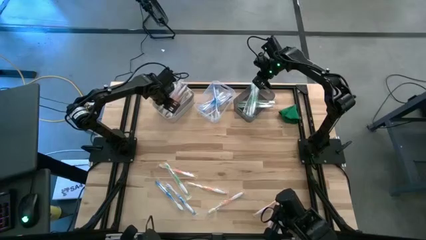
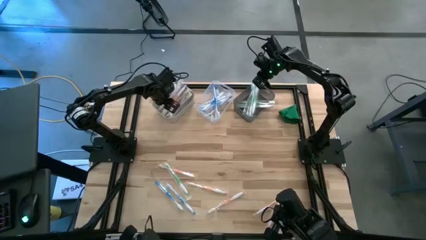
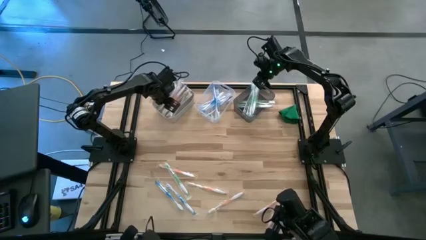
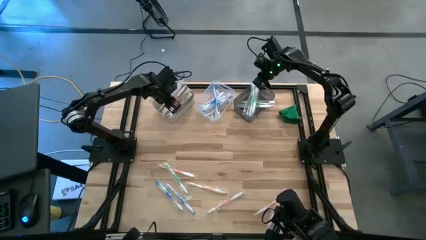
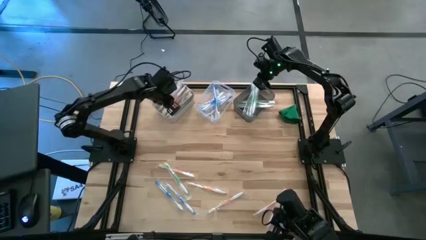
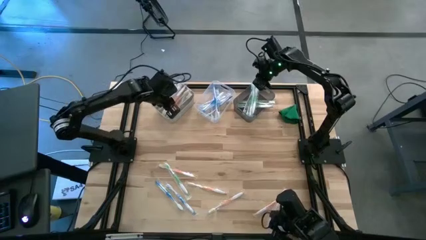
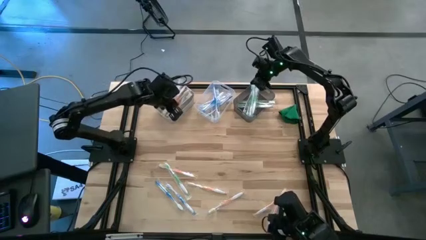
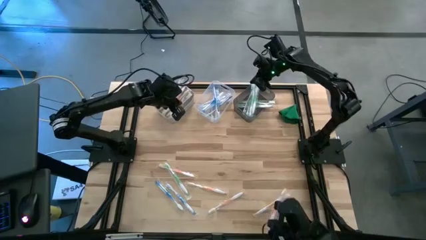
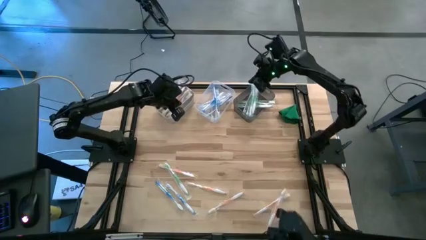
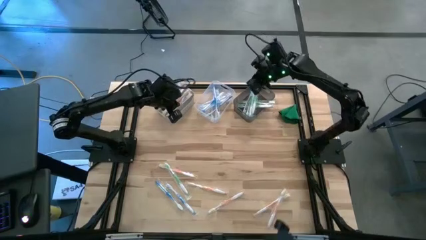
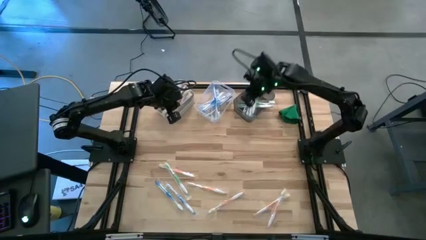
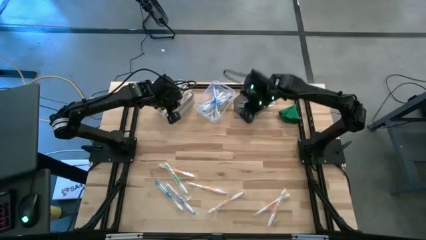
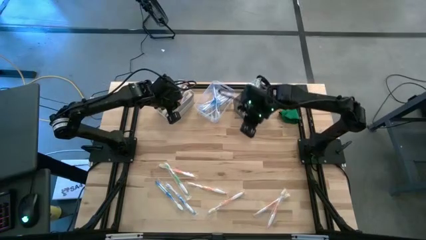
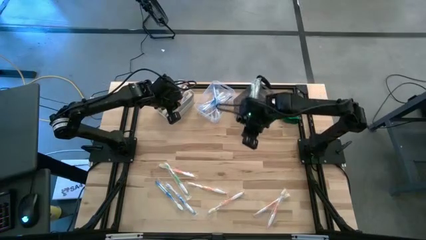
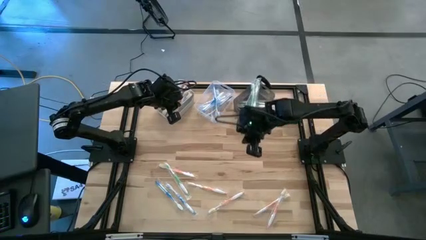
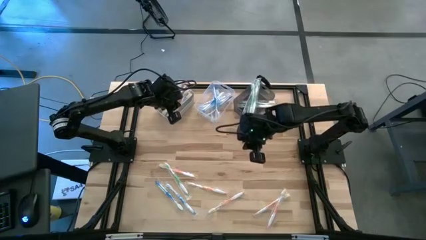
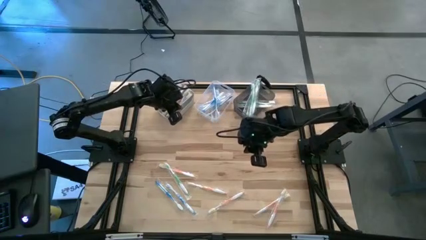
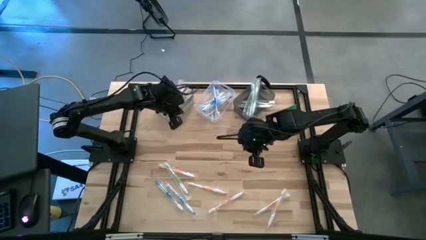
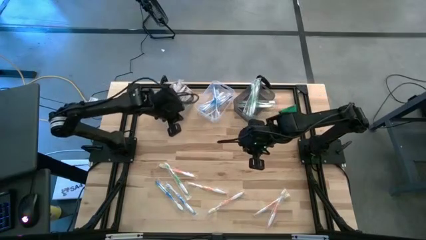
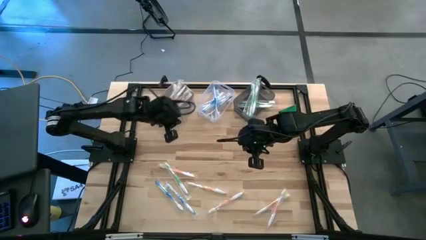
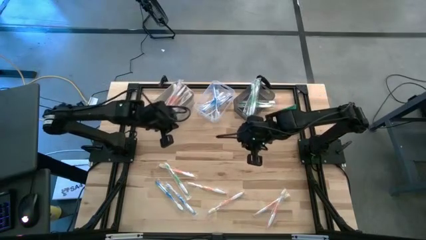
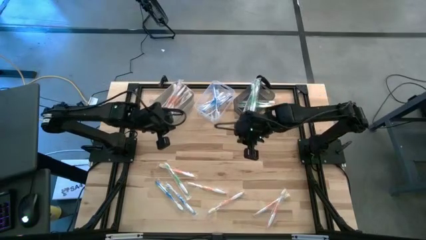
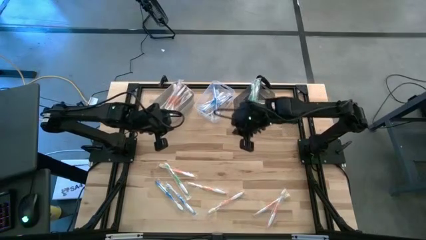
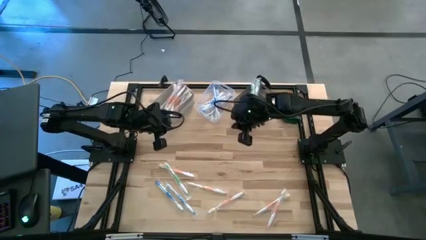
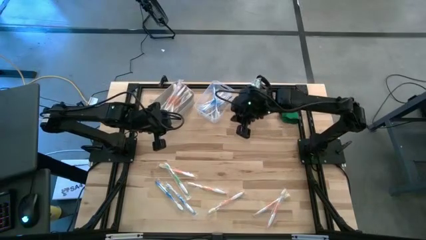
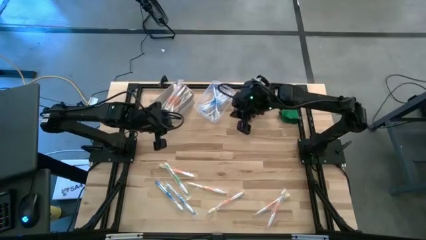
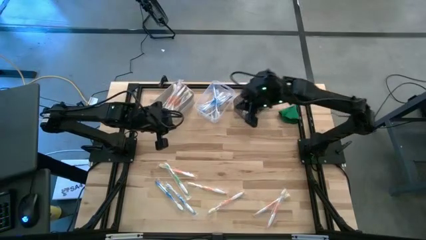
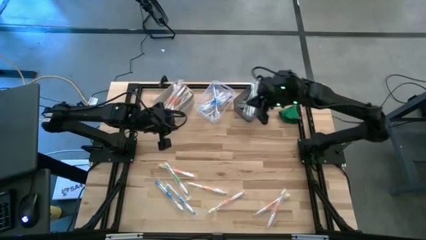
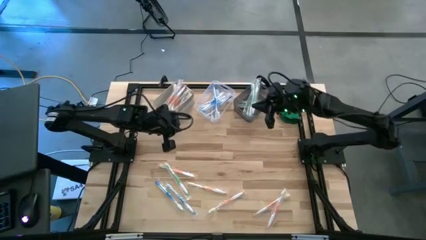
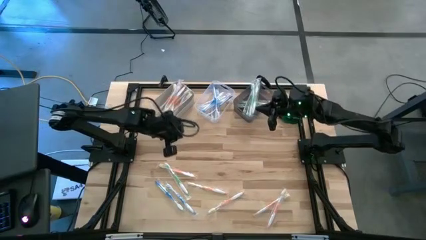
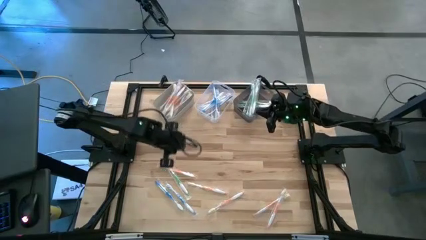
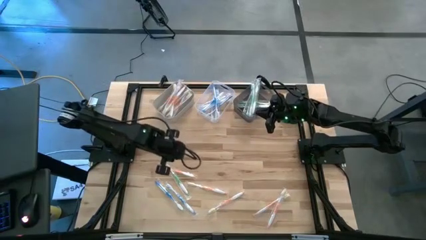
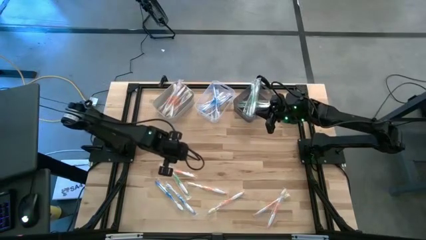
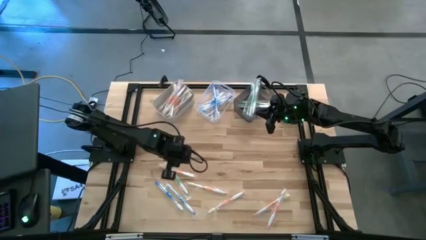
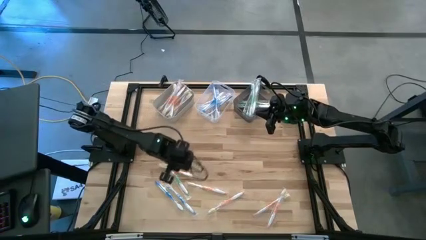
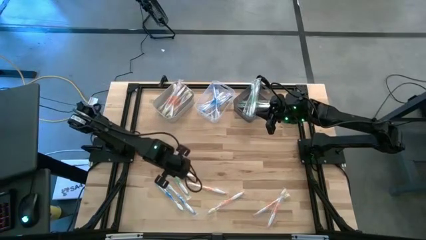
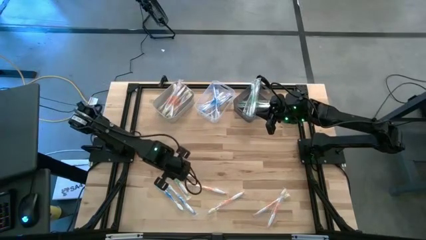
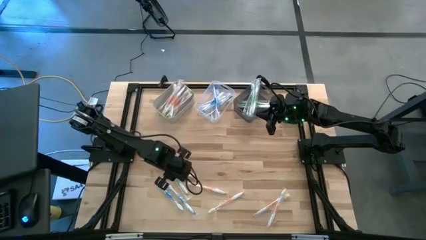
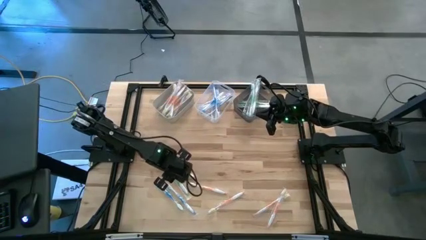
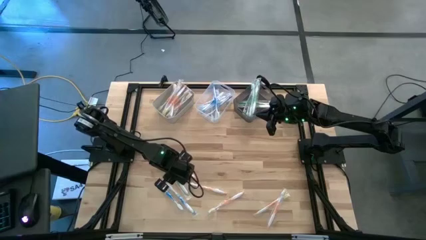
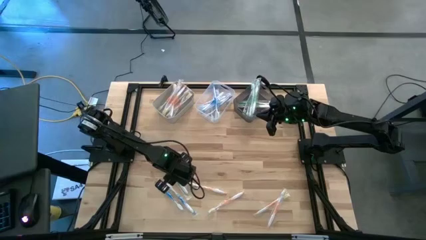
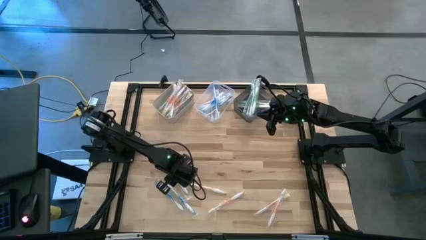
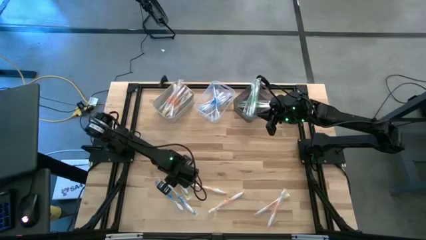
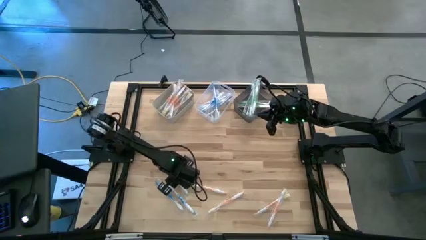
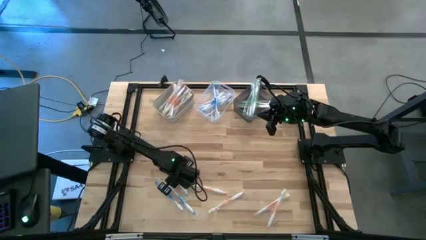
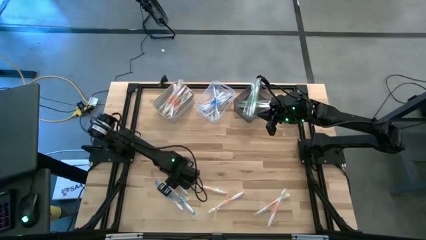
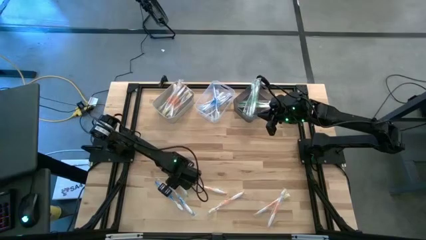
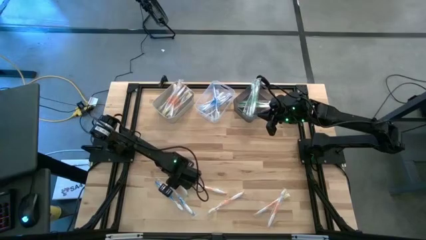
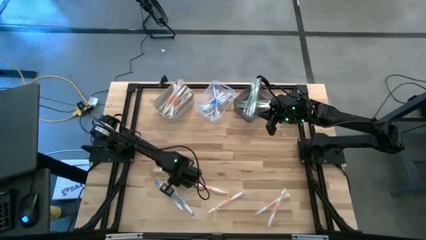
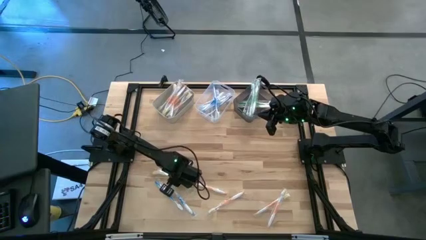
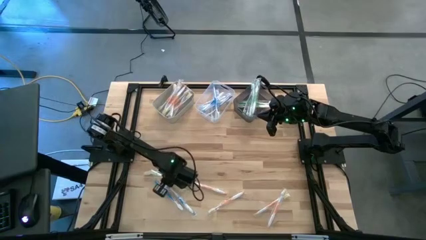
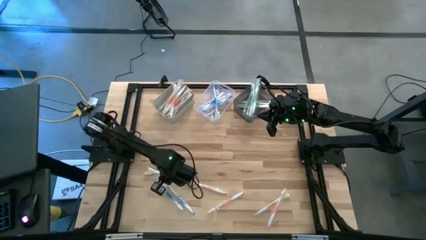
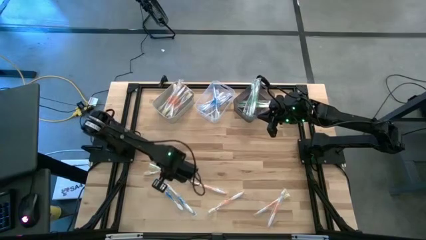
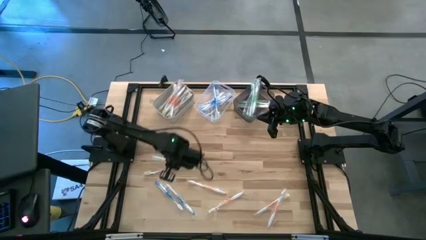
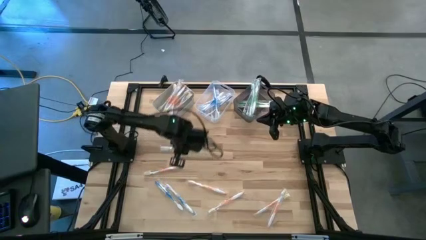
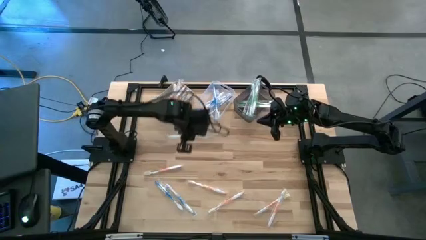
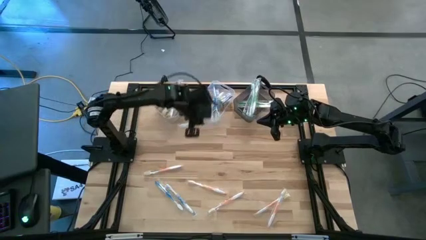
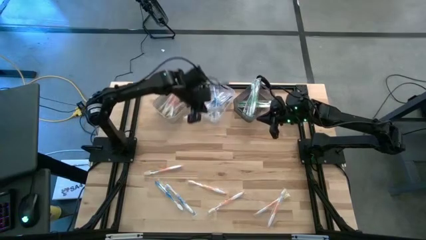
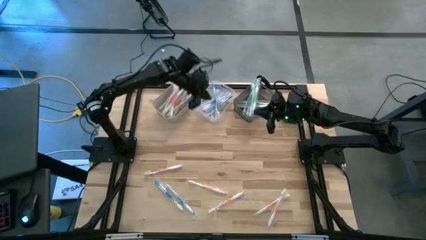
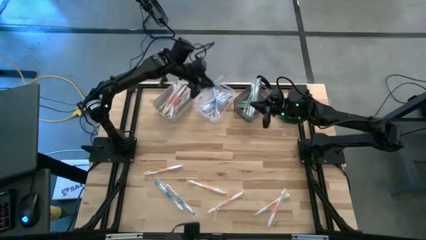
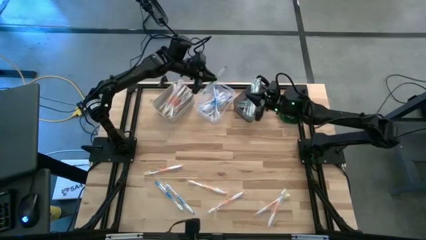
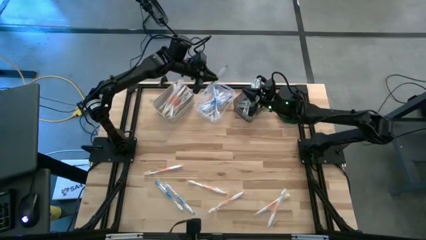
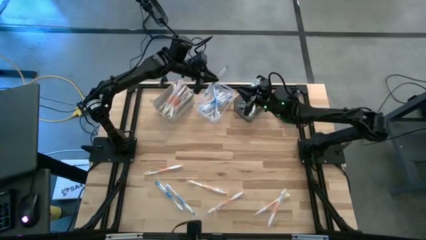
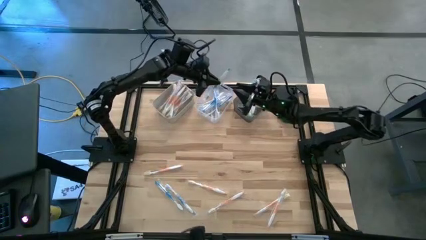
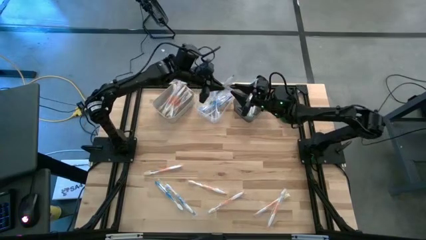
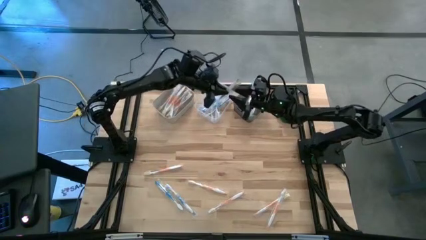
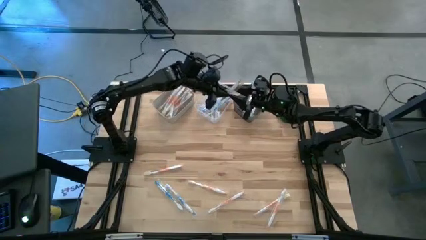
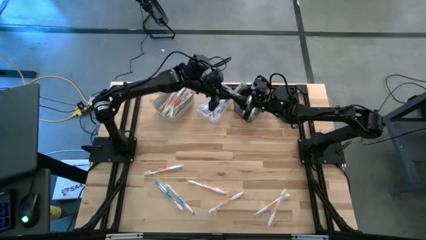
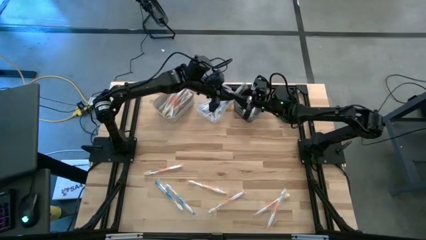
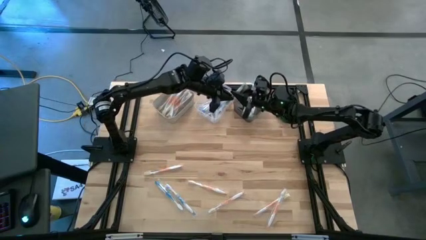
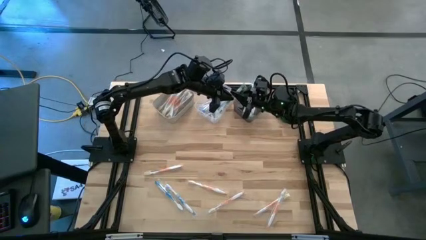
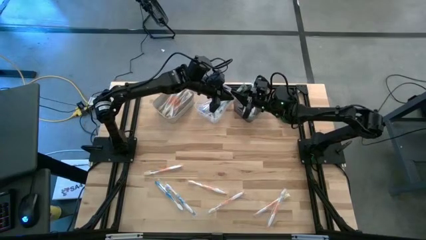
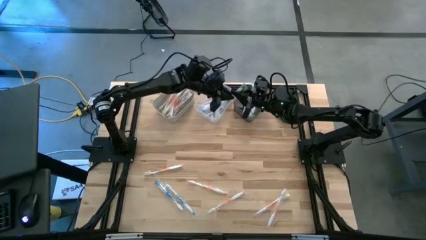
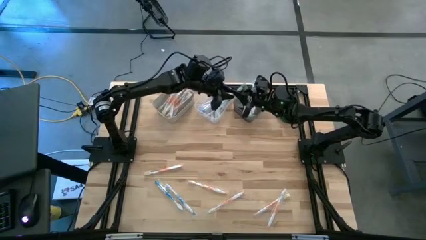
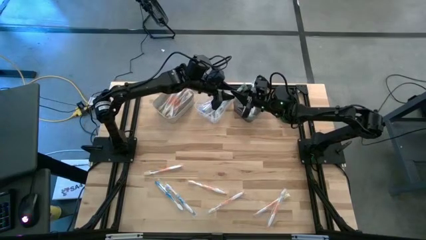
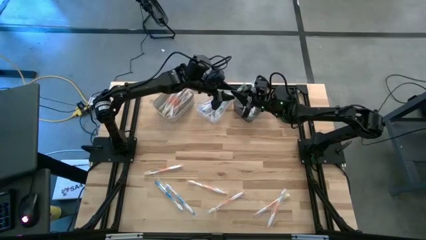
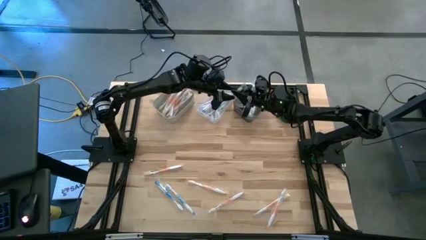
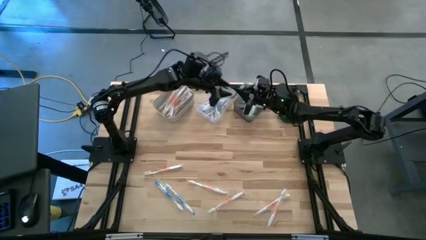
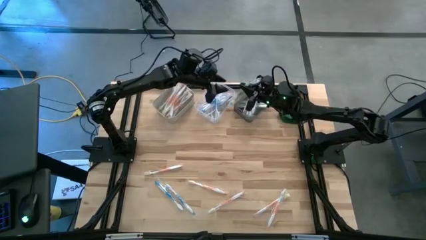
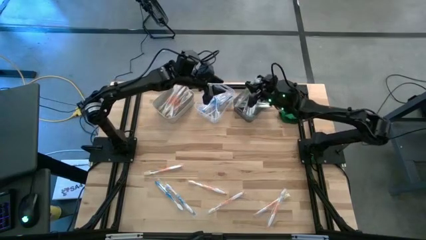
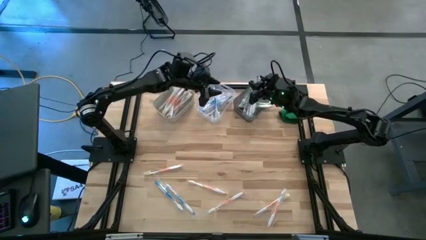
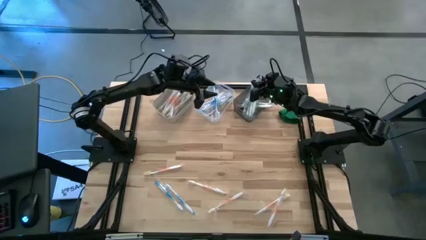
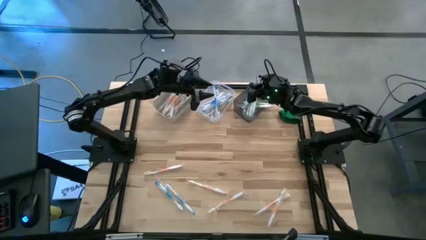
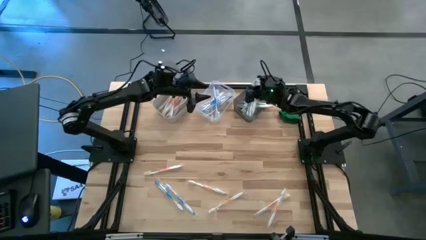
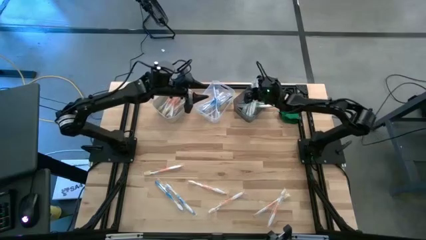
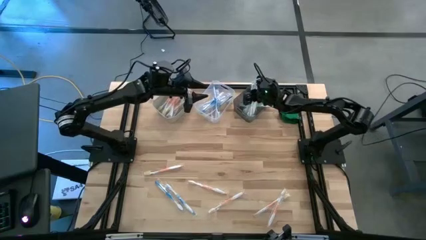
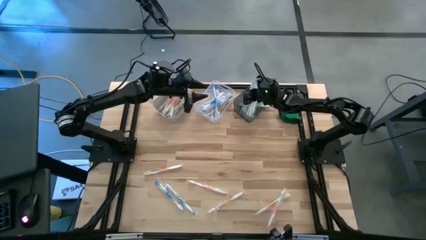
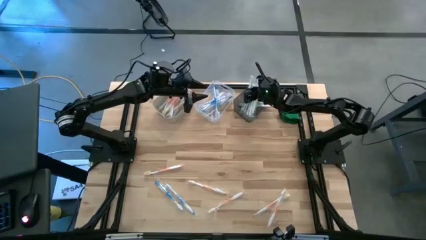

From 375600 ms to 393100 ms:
Task: Pick & Place Toothbrushes
Put the green toothbrush into the black bin
